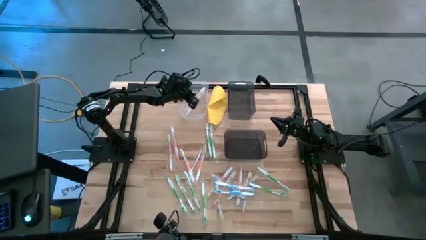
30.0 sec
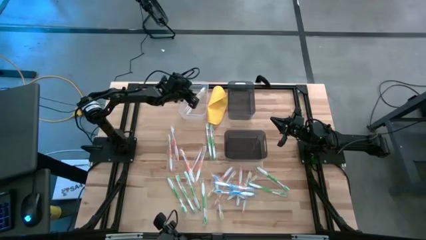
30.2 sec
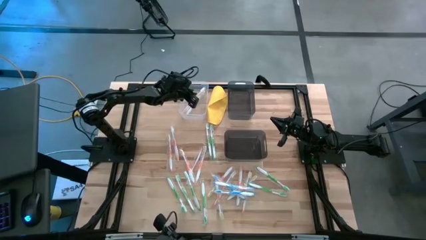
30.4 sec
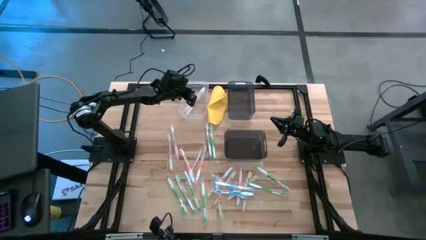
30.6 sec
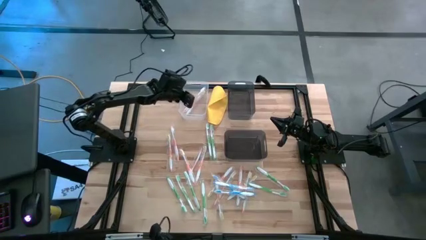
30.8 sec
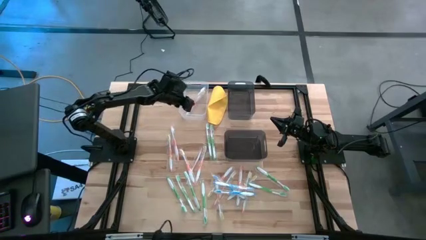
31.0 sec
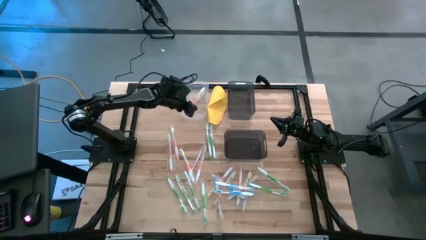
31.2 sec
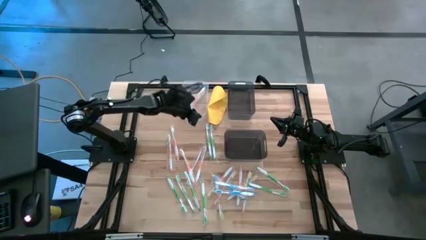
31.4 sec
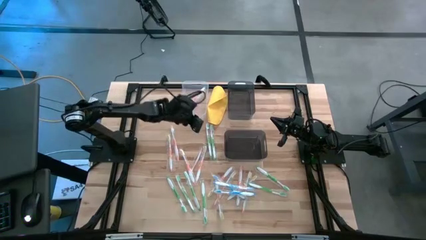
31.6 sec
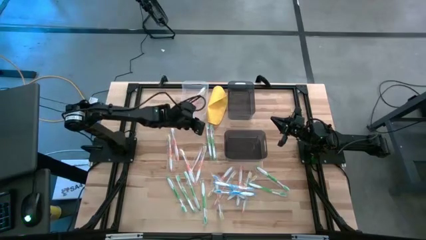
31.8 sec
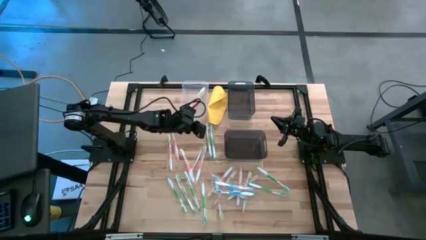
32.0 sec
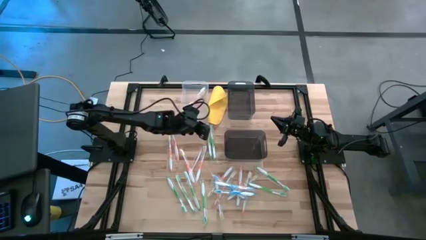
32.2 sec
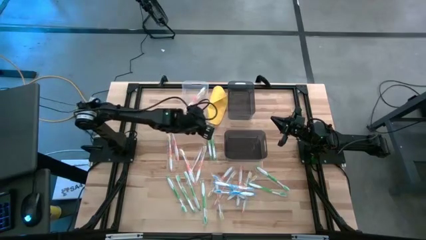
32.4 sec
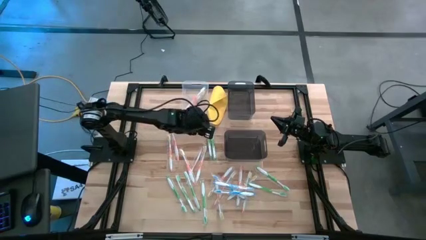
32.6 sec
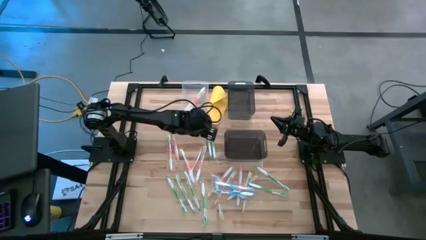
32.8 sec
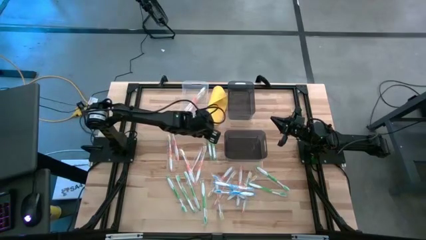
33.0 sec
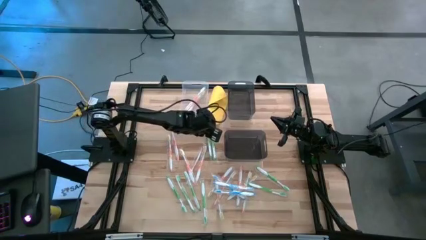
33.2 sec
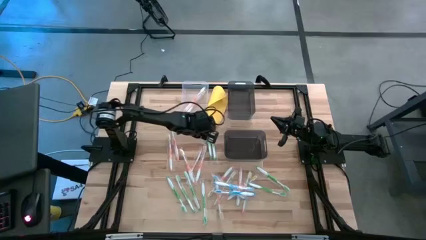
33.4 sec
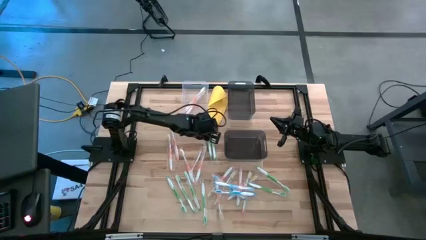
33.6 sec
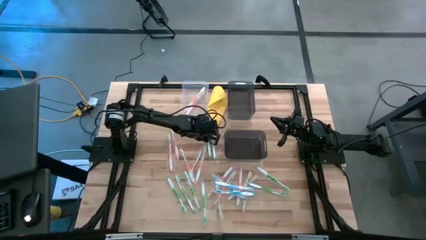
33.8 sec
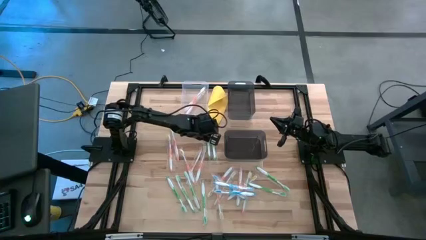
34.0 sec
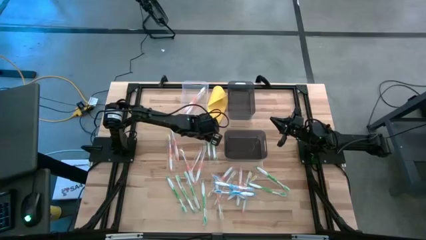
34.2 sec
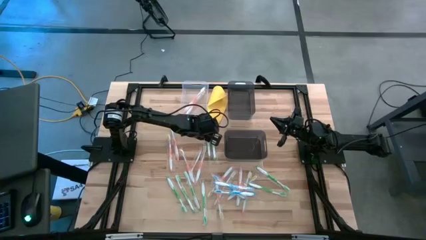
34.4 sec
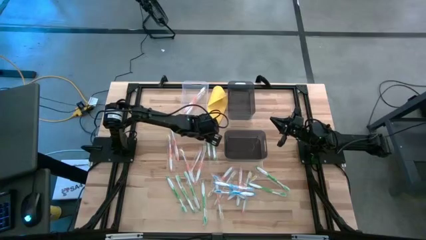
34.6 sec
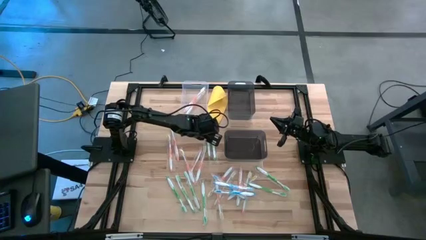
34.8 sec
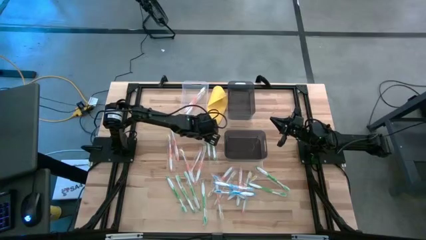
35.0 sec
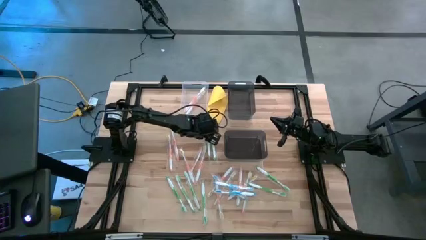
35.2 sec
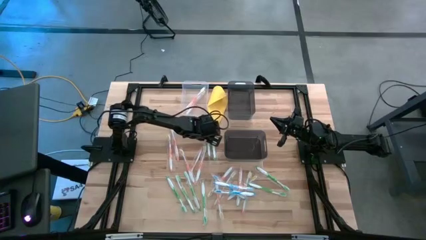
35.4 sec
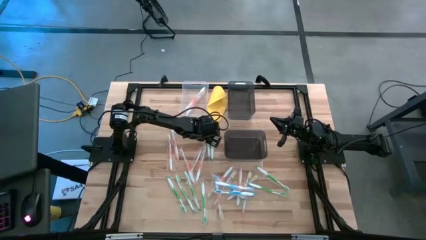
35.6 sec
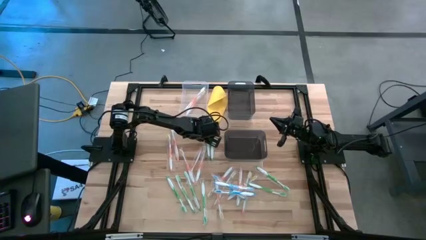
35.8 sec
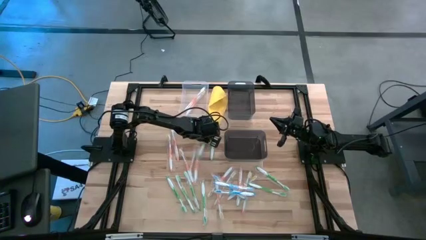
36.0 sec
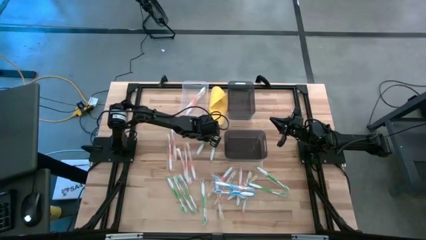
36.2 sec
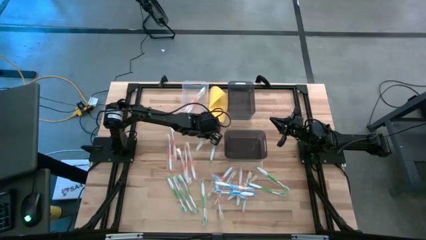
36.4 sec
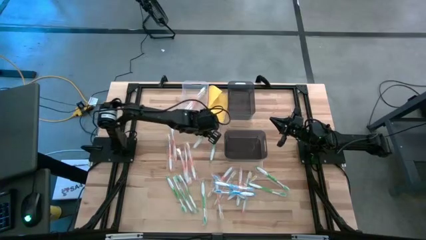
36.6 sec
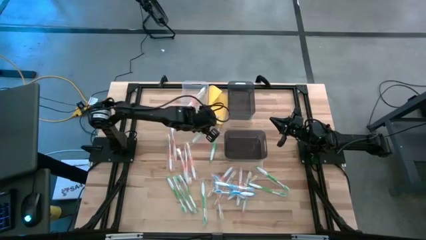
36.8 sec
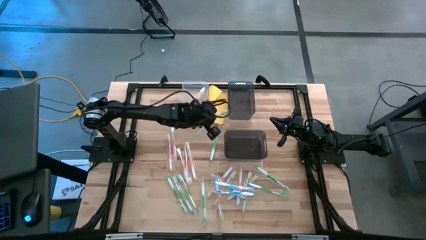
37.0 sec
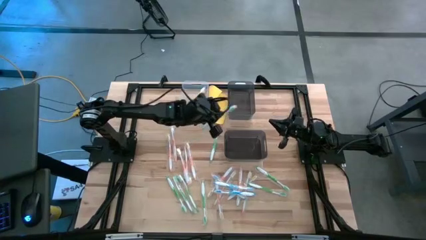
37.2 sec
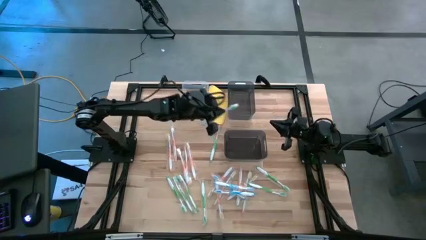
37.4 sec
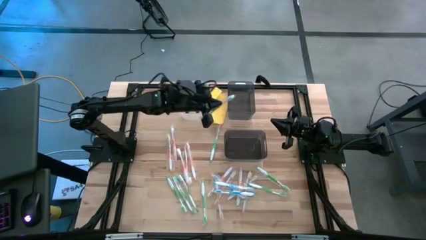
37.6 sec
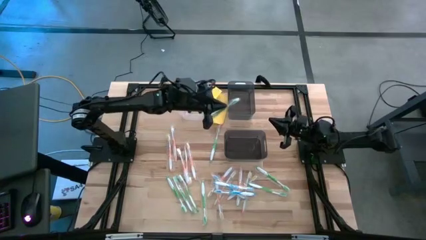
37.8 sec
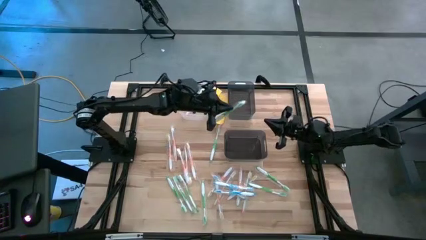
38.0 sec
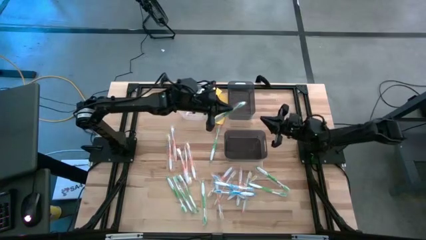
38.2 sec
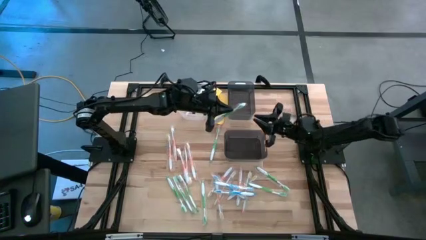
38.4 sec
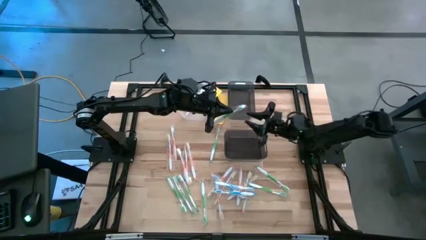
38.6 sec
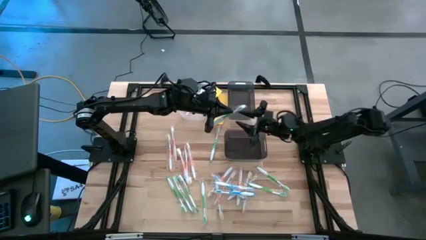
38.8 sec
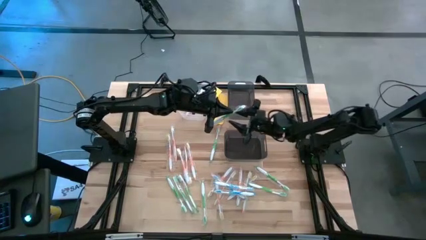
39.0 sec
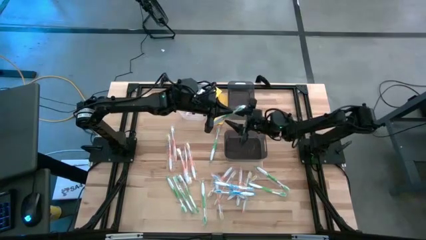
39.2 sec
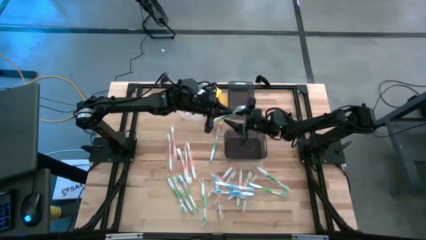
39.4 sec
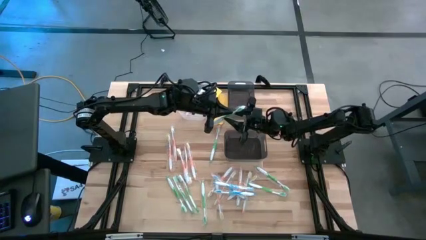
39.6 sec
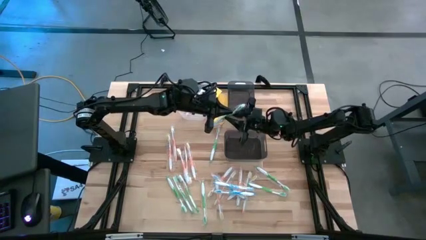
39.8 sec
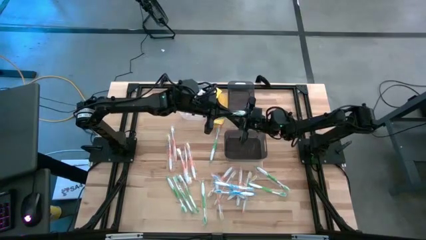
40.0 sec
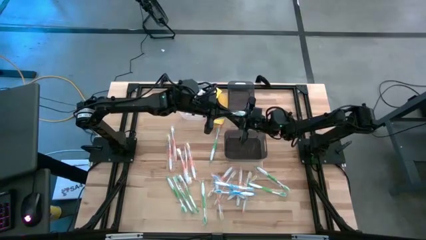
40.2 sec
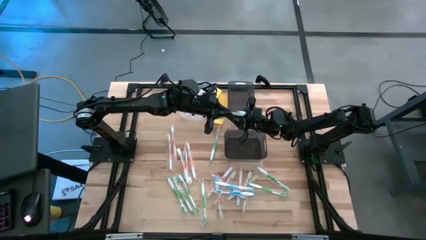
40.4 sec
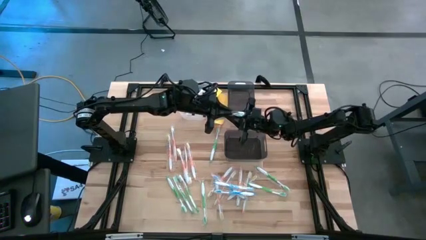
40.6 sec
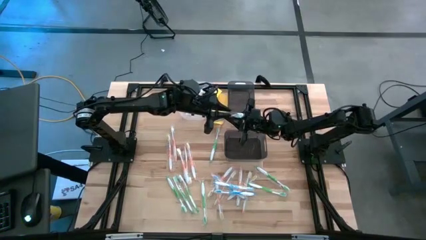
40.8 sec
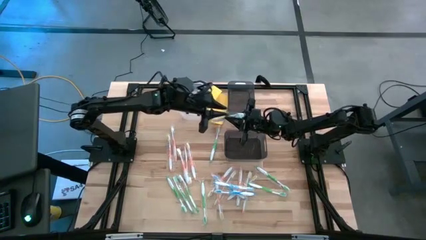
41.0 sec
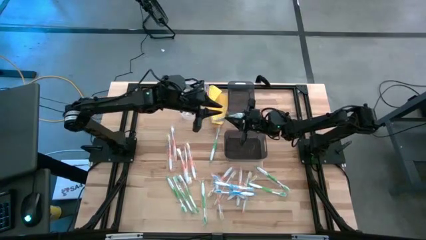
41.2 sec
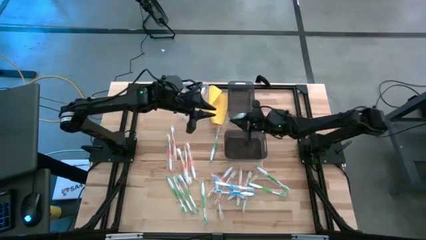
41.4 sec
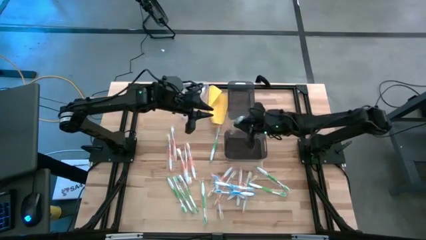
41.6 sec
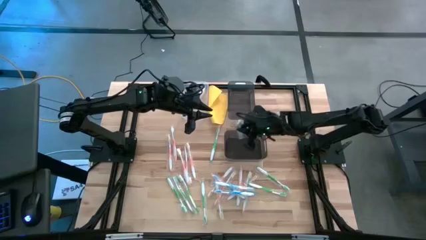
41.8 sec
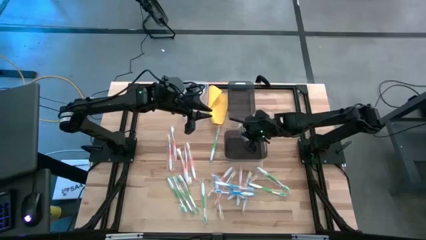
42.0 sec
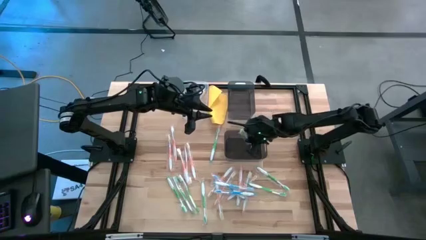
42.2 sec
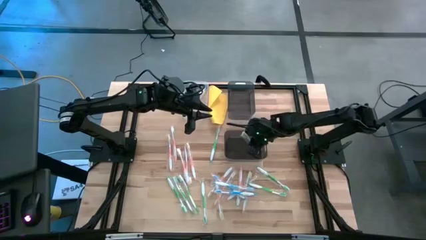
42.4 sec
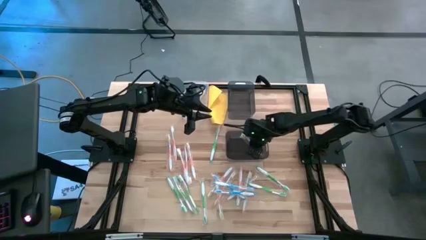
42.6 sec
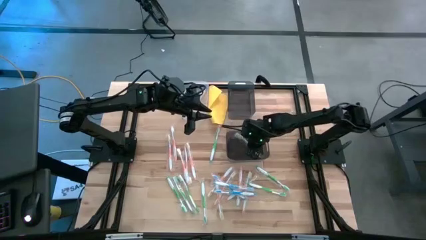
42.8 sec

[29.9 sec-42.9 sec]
Task: Pick & Place Toothbrushes
Put the green toothbrush into the bottom black transparent bin
